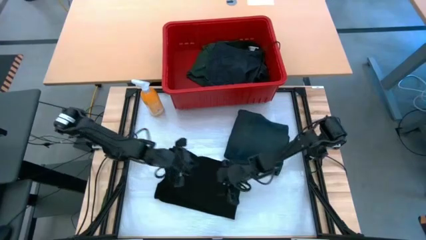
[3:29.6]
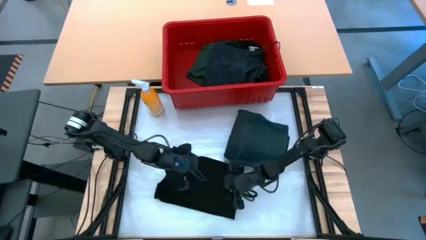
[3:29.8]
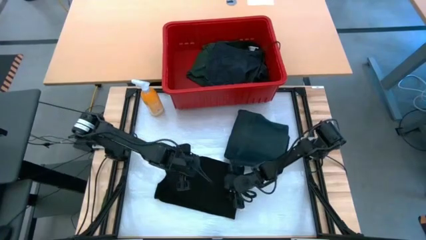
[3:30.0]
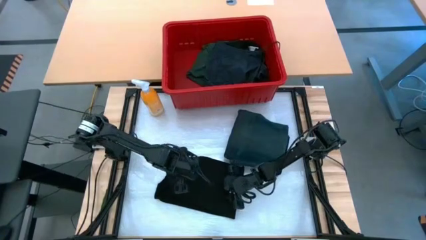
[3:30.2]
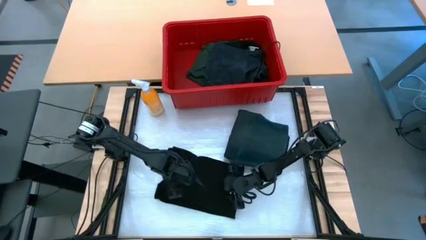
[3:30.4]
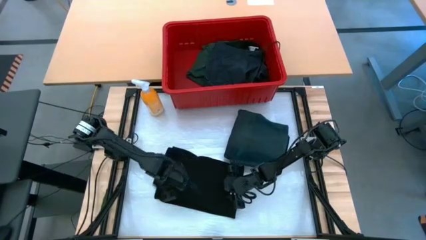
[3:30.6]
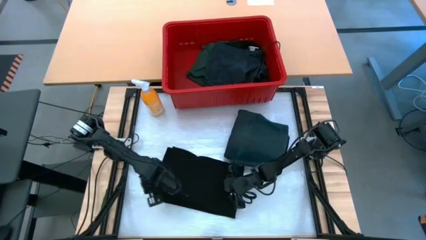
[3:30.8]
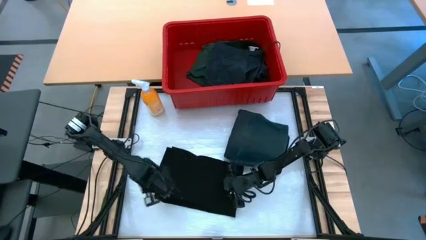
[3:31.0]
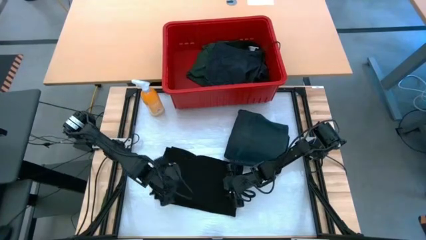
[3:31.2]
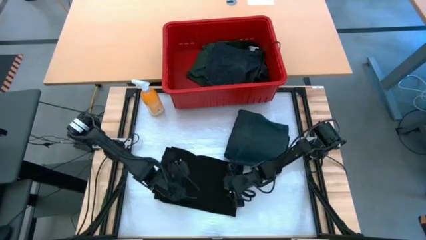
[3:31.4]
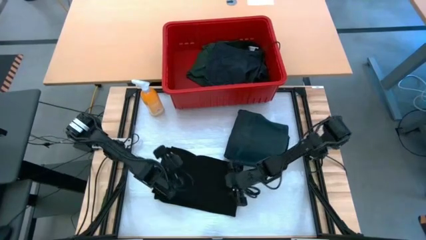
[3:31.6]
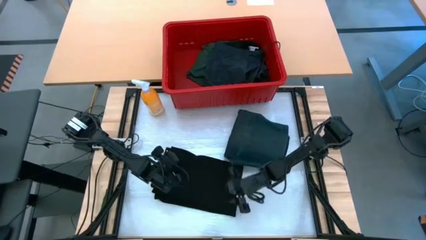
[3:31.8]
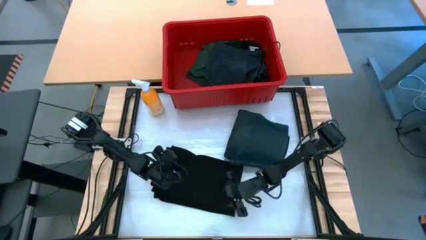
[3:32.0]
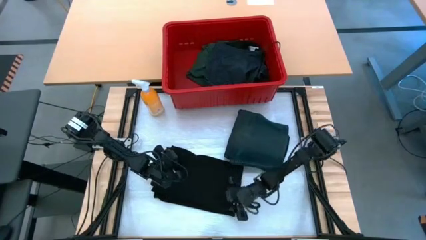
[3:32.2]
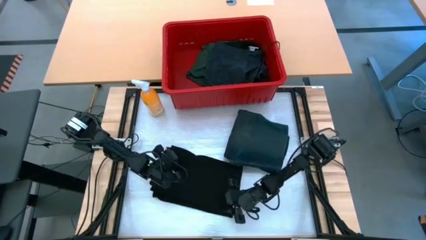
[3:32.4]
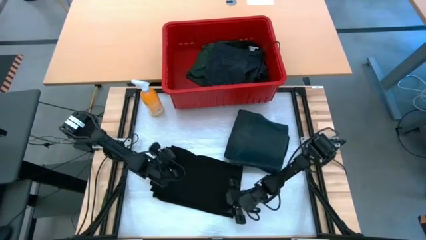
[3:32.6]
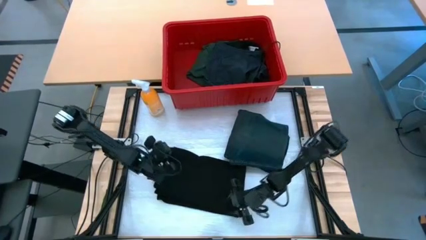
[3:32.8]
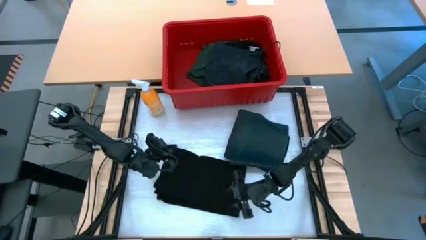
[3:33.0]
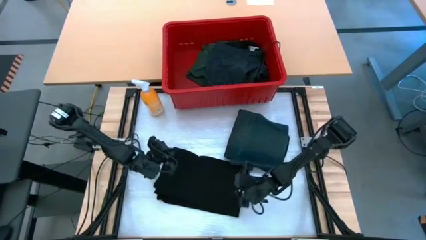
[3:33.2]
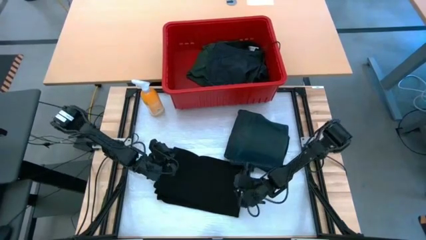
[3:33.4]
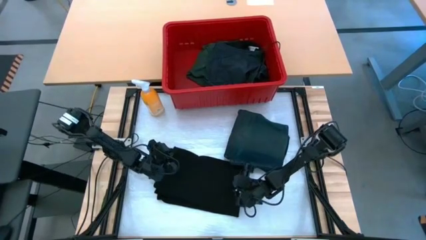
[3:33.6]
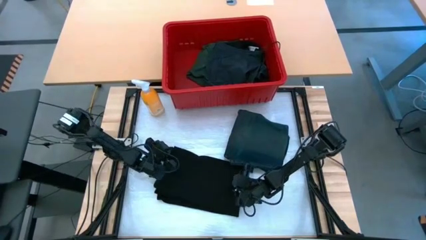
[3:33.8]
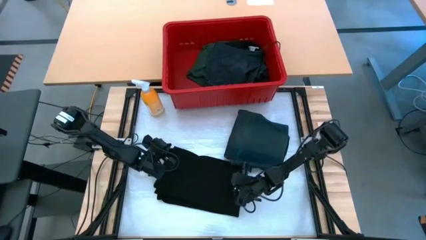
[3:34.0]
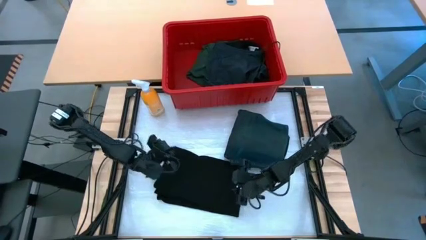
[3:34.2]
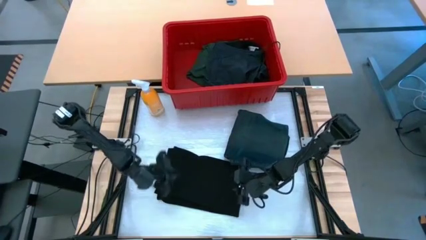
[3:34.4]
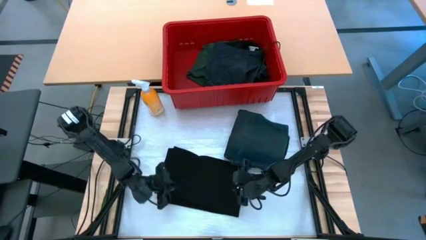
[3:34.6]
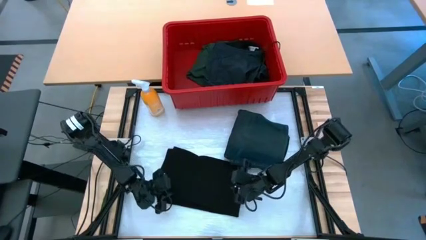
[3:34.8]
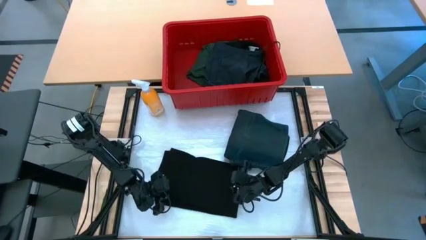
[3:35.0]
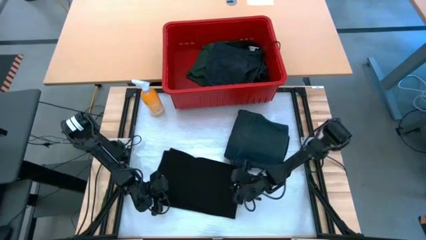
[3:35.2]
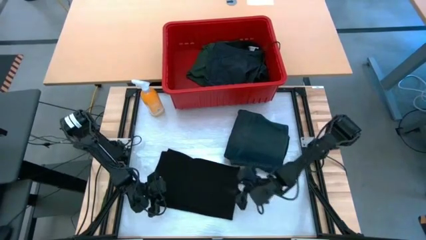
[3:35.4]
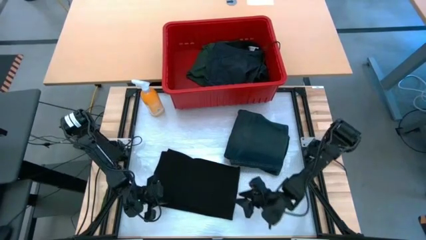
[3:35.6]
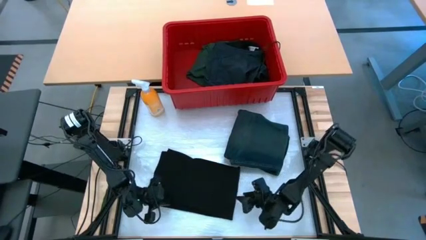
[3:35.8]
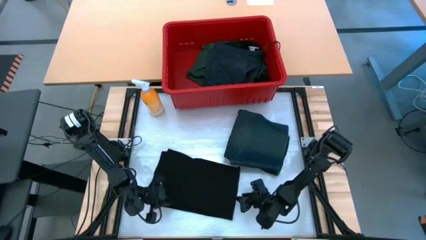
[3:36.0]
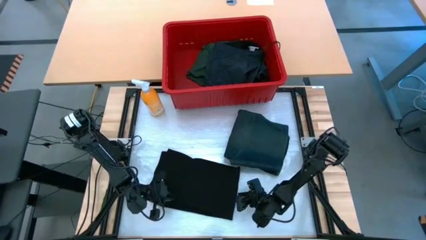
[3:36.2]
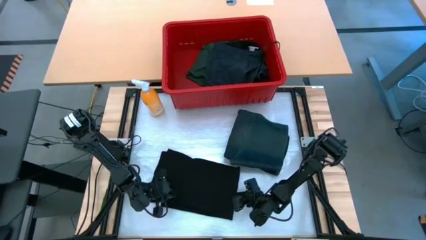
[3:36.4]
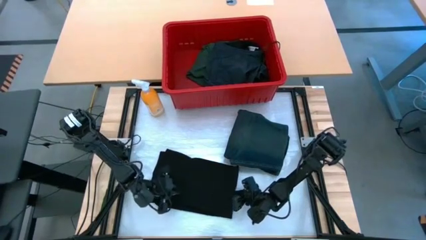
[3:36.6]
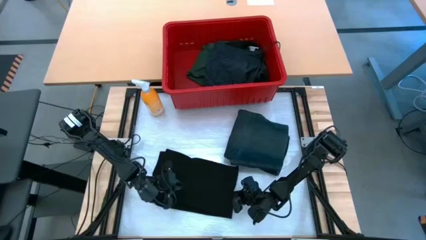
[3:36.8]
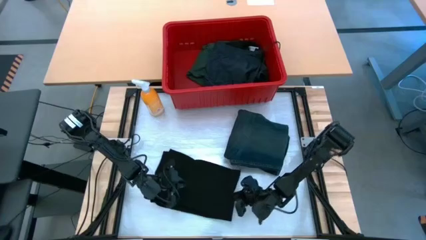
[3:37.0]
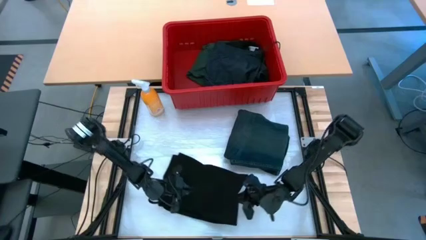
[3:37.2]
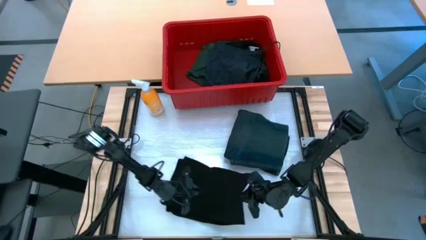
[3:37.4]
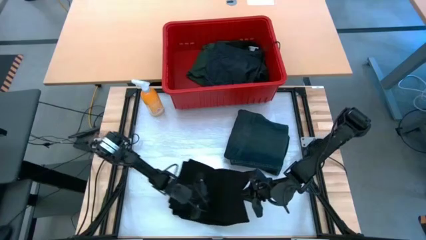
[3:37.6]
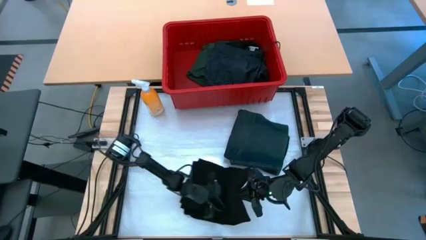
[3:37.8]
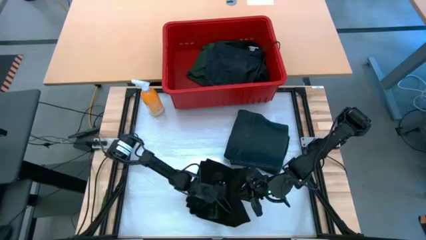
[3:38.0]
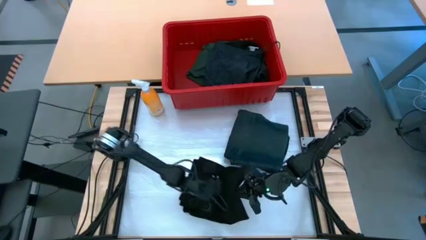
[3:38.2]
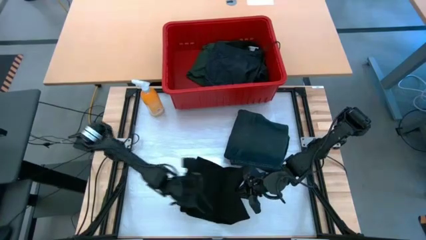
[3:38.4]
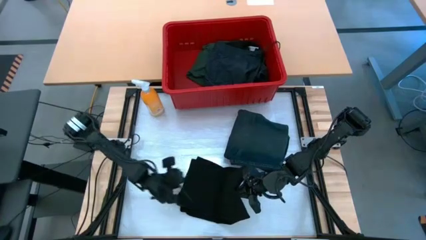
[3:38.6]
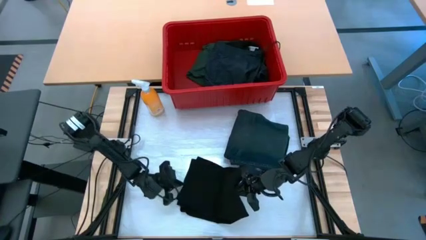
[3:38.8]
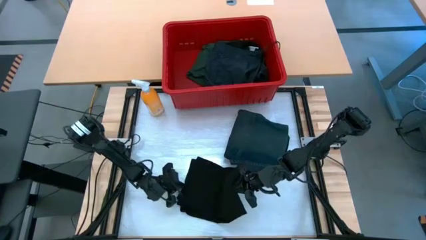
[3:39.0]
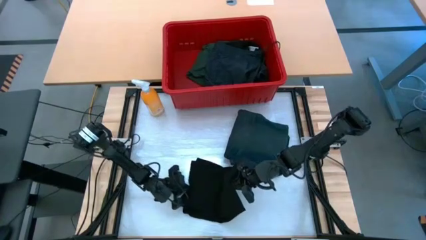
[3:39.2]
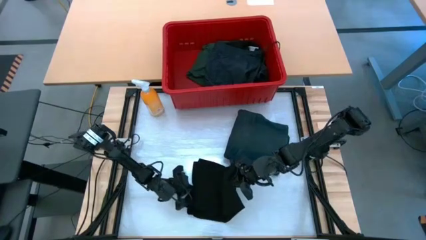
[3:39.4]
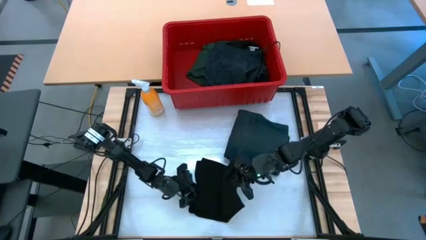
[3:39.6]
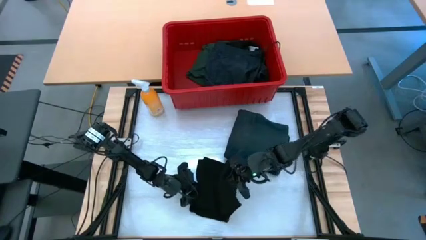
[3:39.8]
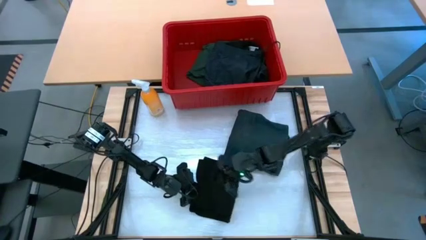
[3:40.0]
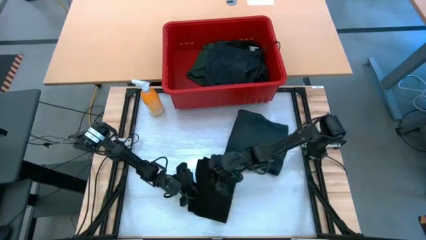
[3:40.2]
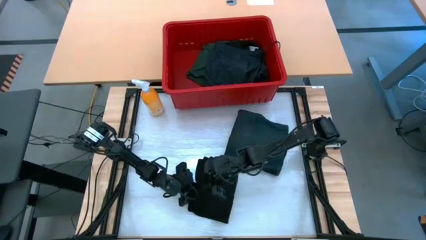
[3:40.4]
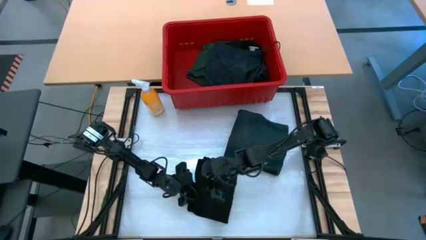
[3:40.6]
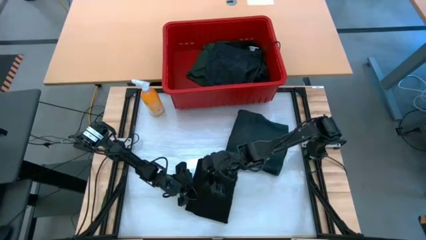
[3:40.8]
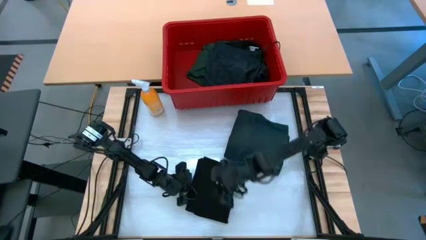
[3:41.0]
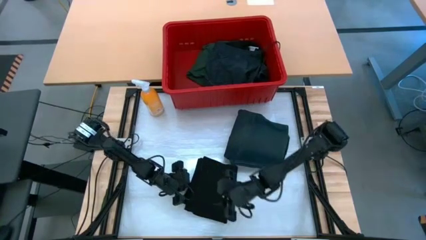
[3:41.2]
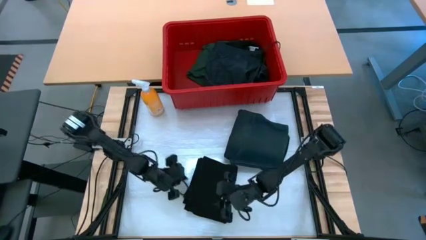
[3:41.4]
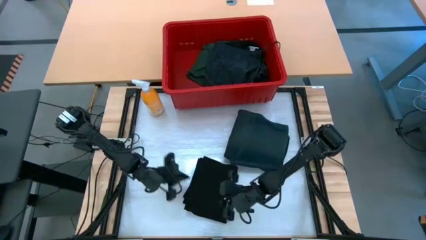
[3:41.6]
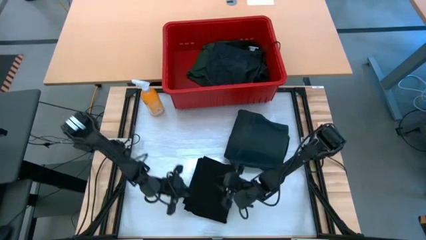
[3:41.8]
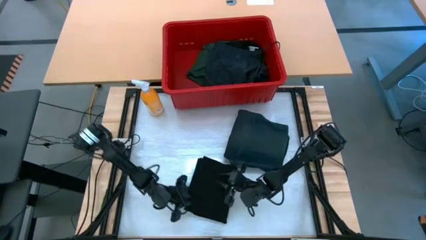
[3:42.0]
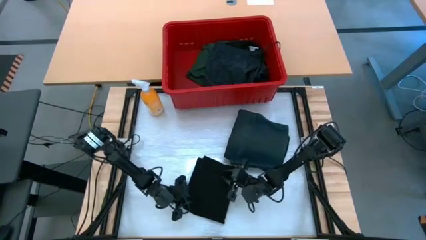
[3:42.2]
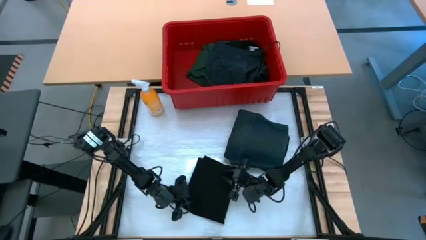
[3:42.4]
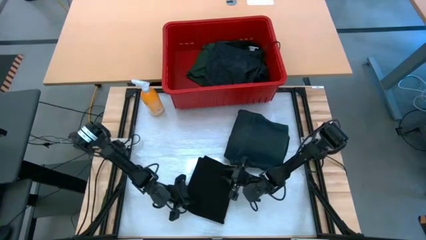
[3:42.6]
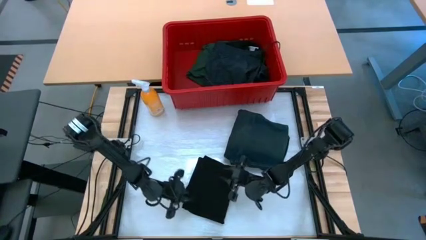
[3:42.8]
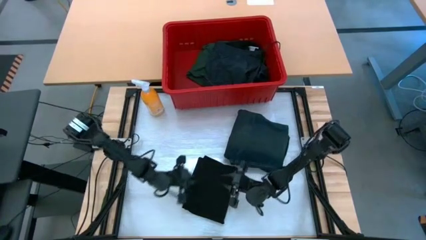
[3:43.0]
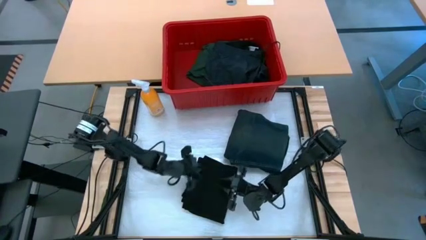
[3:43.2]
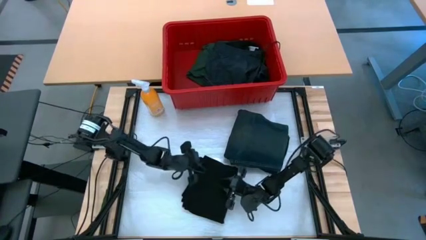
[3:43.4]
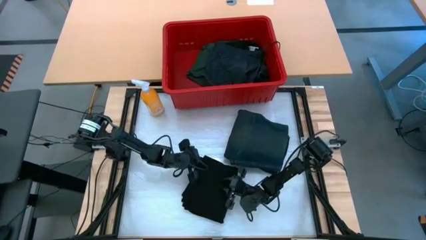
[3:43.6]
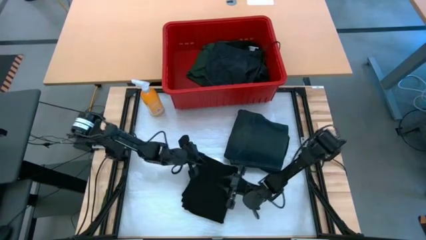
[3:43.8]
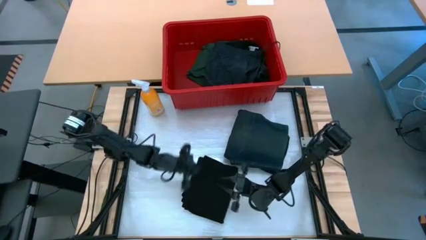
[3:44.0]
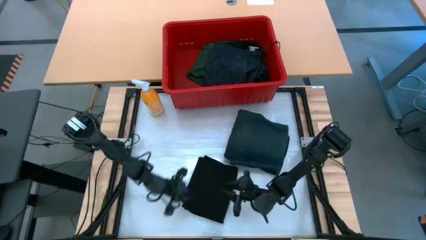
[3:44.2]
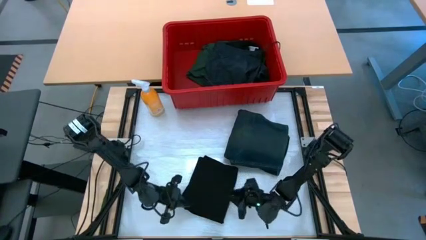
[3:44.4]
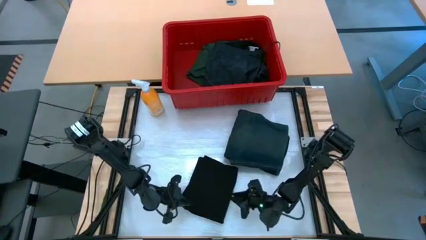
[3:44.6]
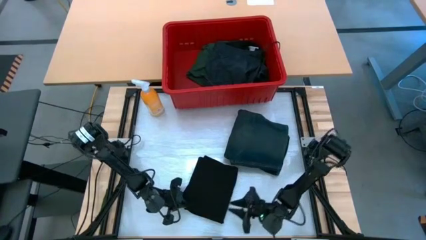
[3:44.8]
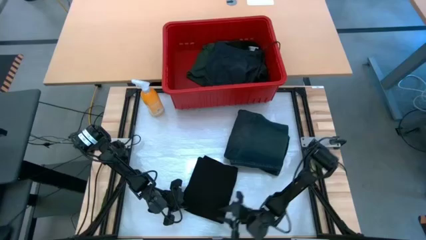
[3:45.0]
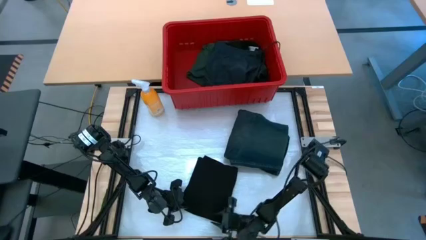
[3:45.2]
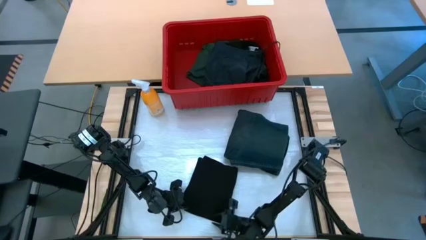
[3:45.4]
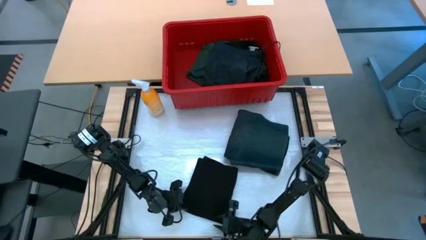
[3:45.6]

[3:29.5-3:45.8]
Task: Fold Laundry from Bin
Fold the black shirt
